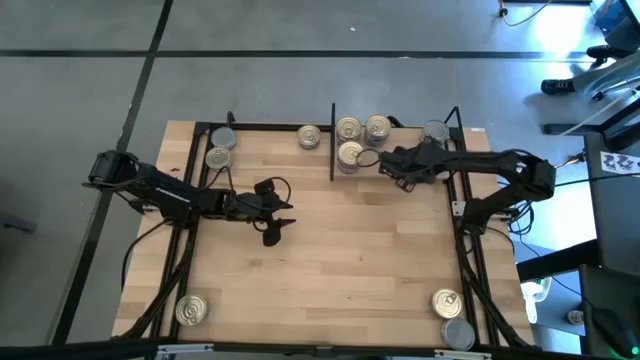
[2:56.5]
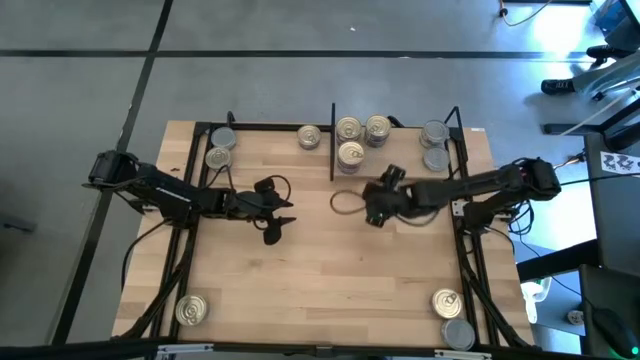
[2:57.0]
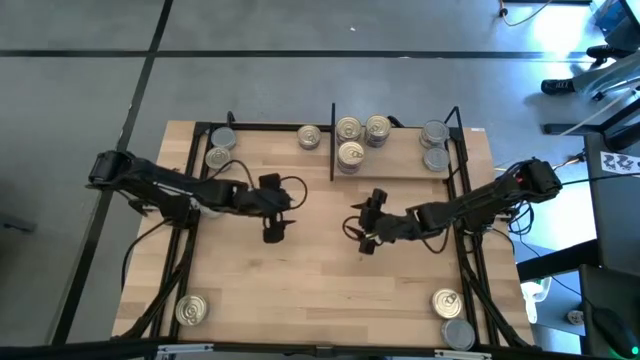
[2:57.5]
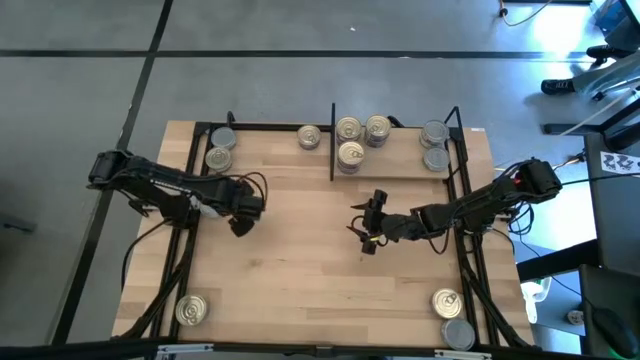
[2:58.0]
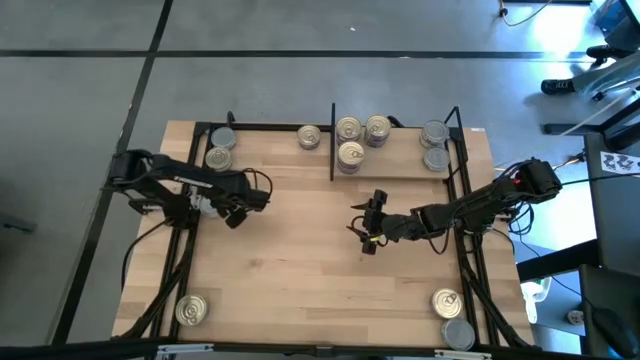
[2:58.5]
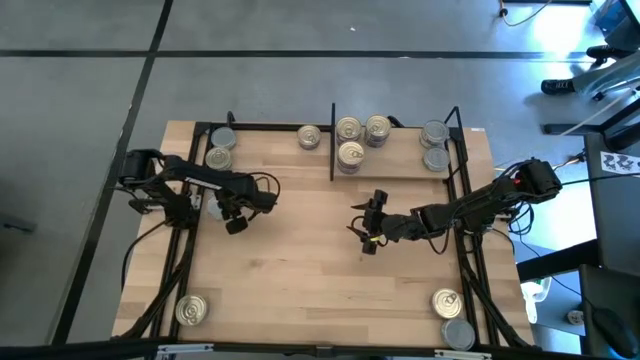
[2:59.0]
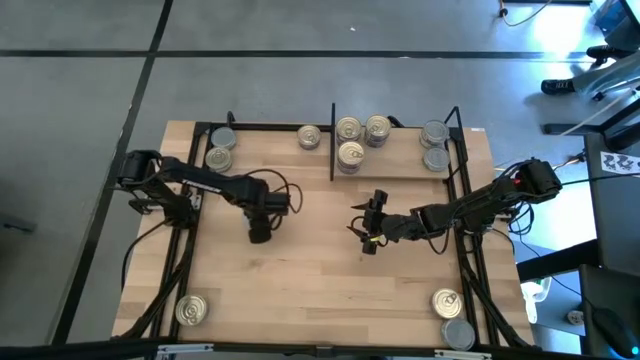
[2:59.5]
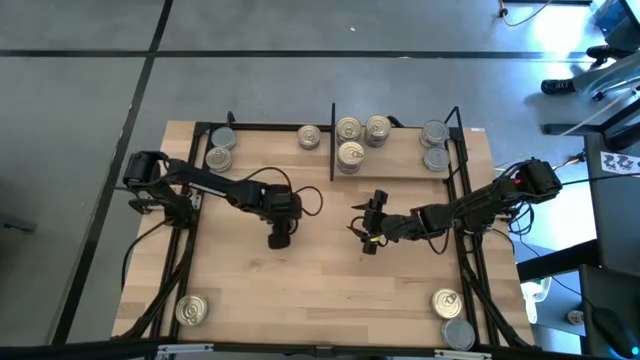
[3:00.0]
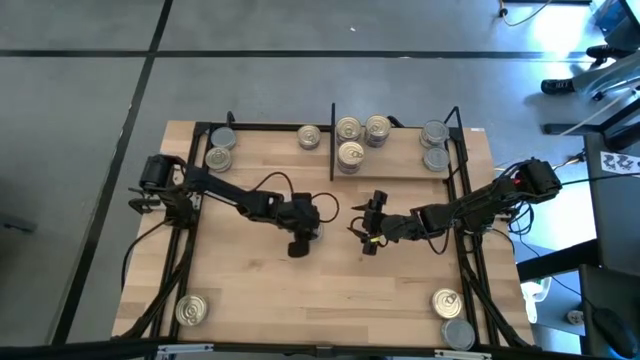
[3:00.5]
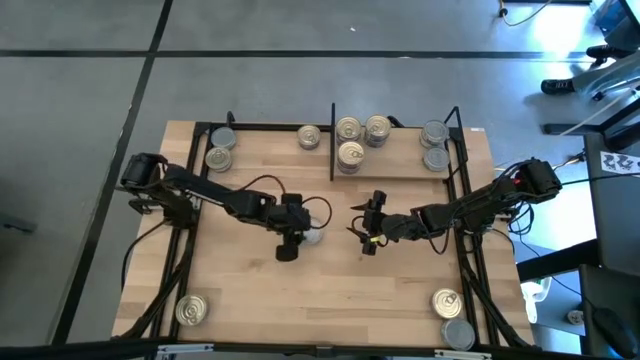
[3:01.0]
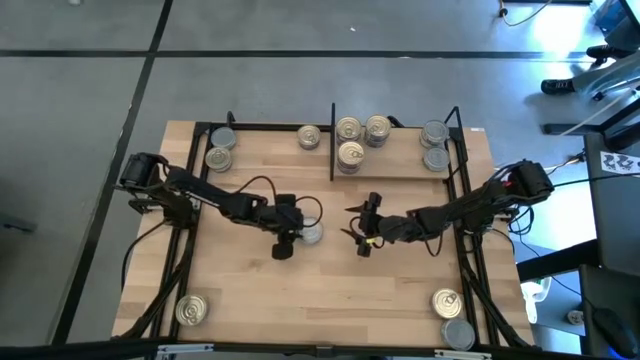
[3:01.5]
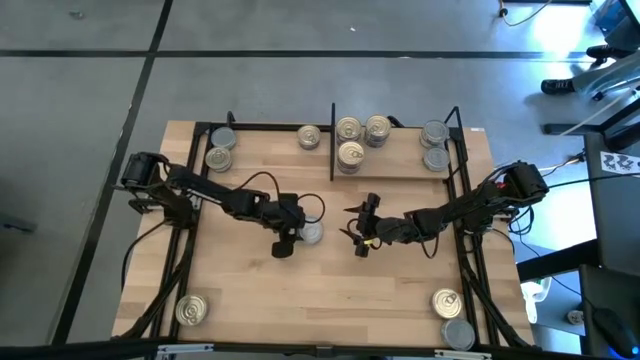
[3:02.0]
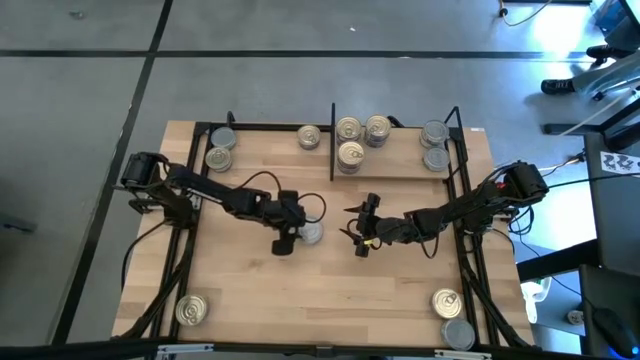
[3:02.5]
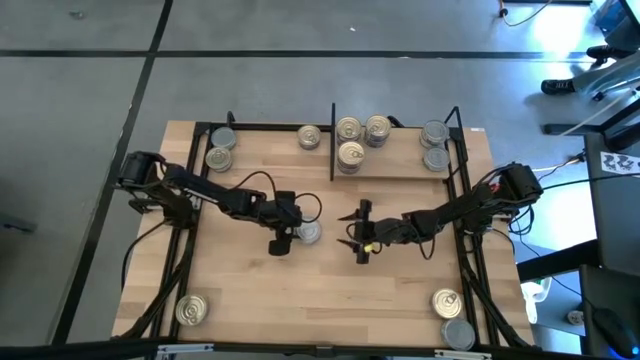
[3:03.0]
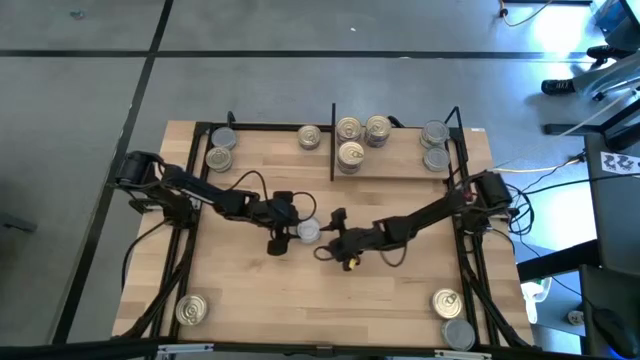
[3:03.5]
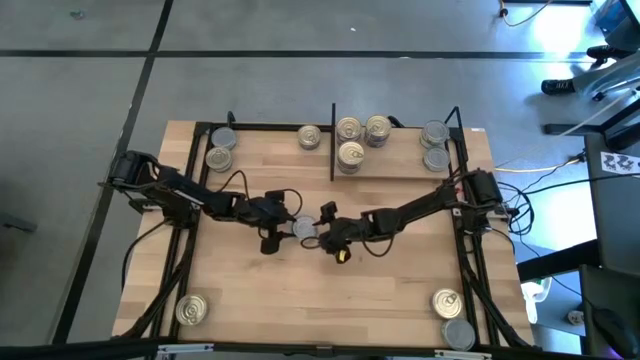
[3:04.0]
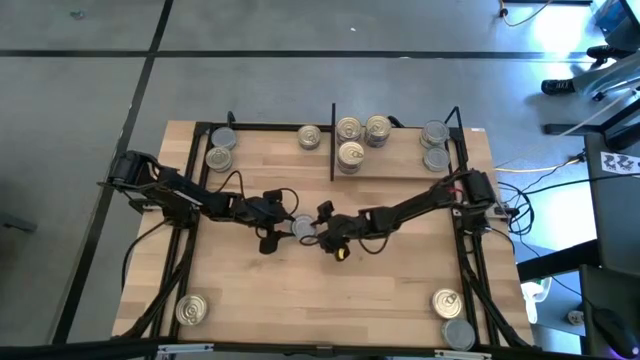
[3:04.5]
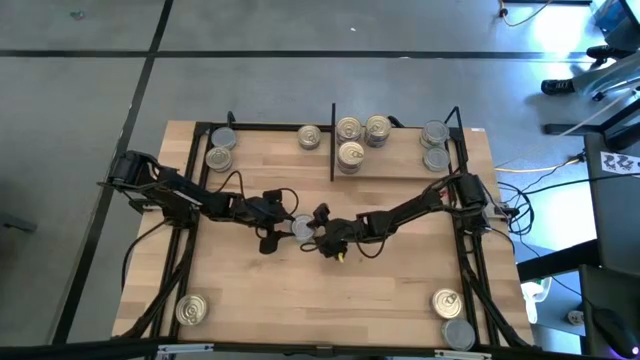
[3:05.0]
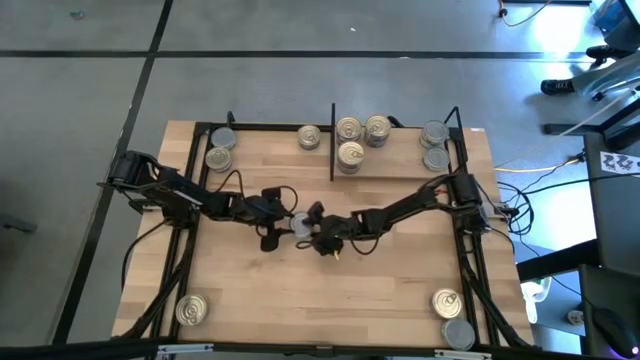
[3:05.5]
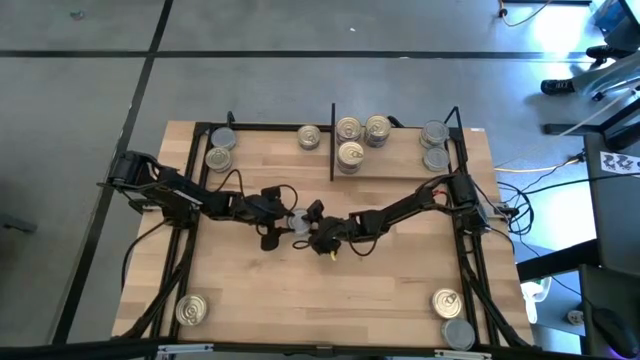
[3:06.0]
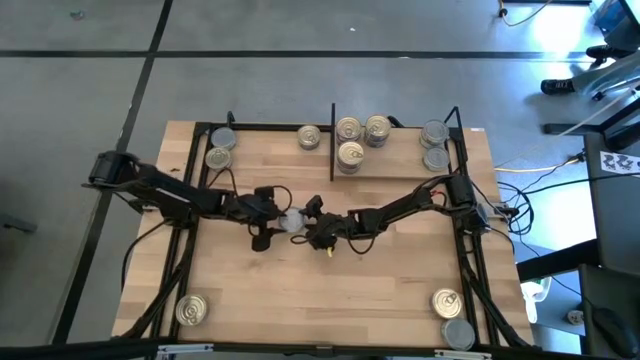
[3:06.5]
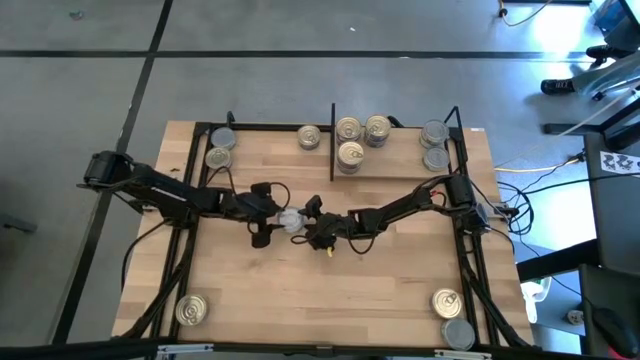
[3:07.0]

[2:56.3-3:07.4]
Task: Stack canned seafood by type on shelf
Stack the green tuna can on top of the green tuna can

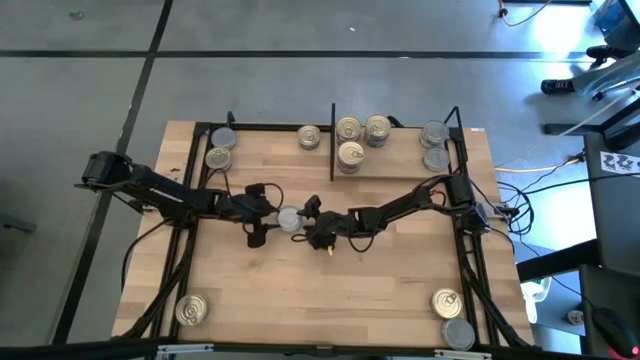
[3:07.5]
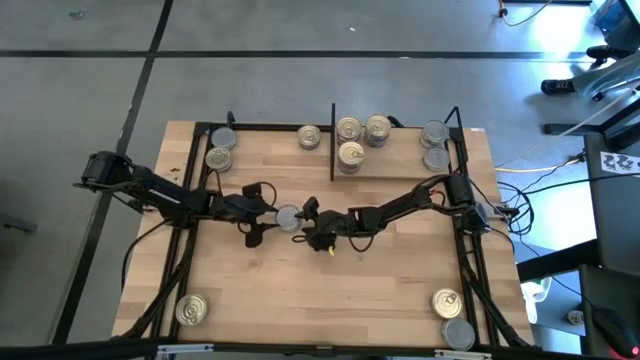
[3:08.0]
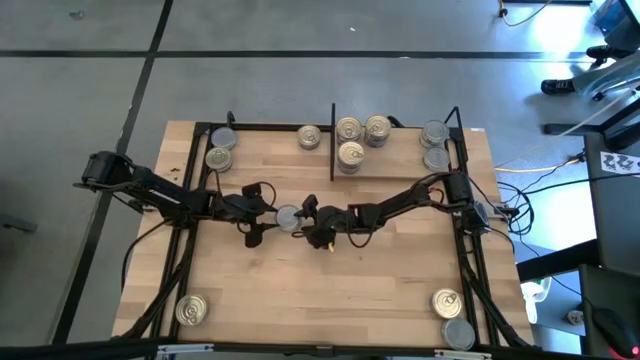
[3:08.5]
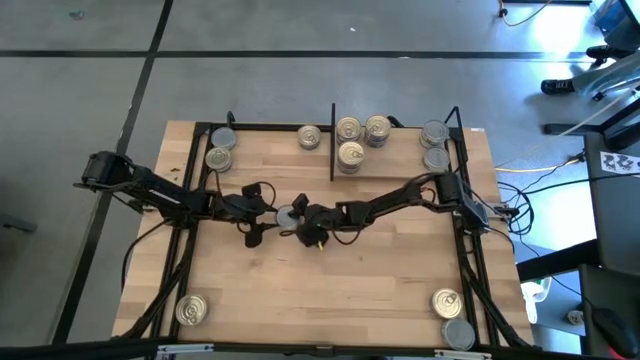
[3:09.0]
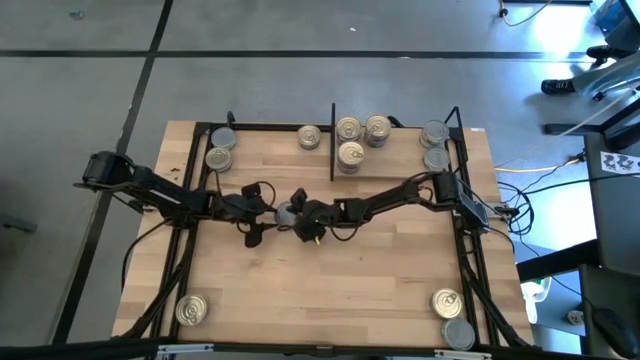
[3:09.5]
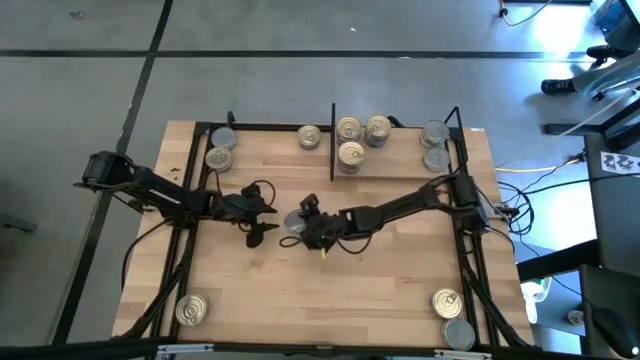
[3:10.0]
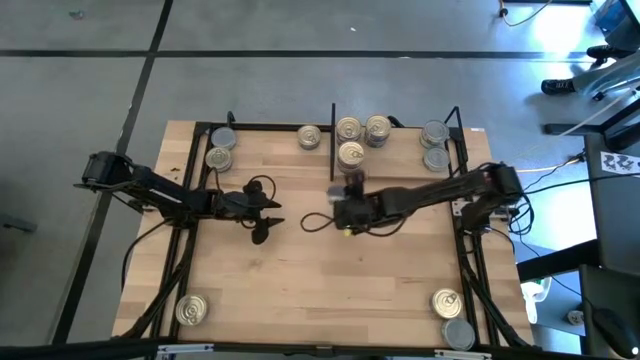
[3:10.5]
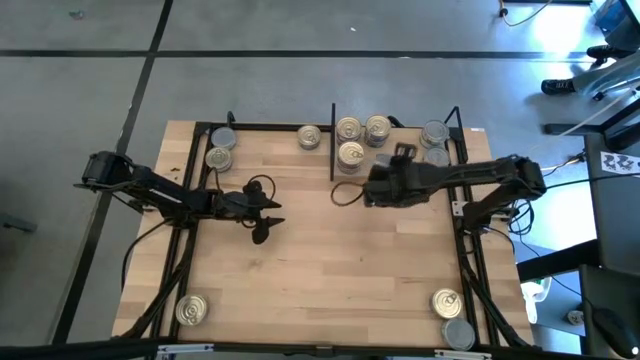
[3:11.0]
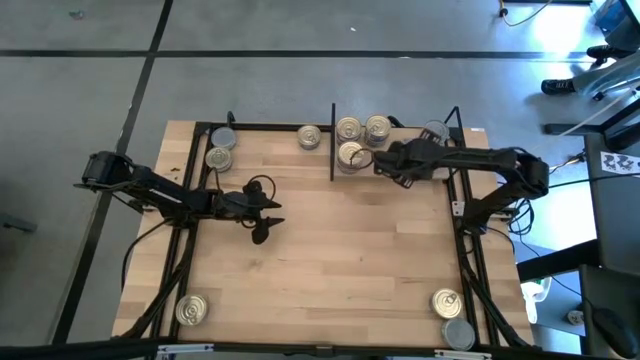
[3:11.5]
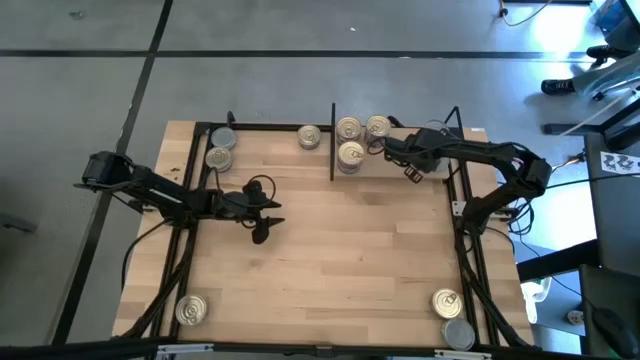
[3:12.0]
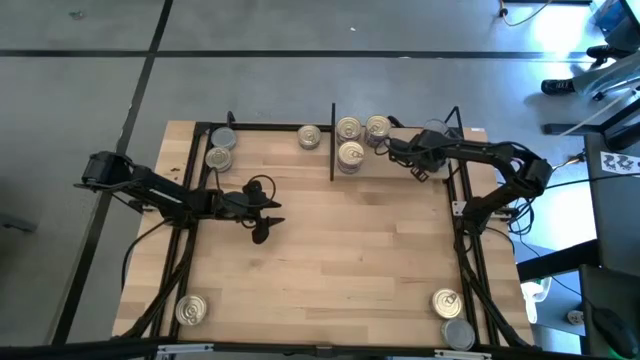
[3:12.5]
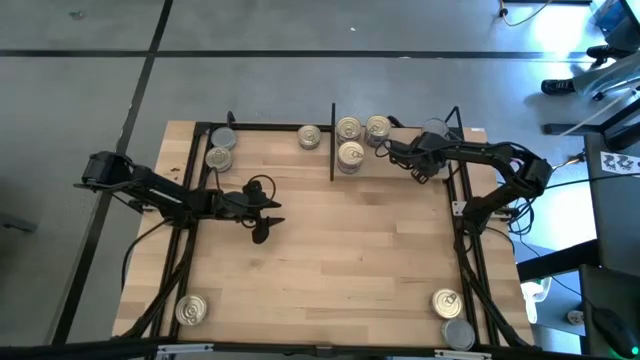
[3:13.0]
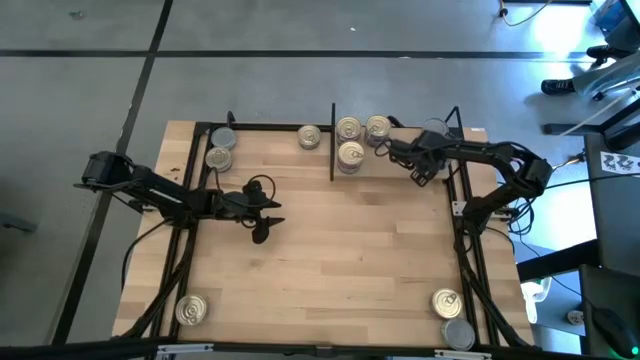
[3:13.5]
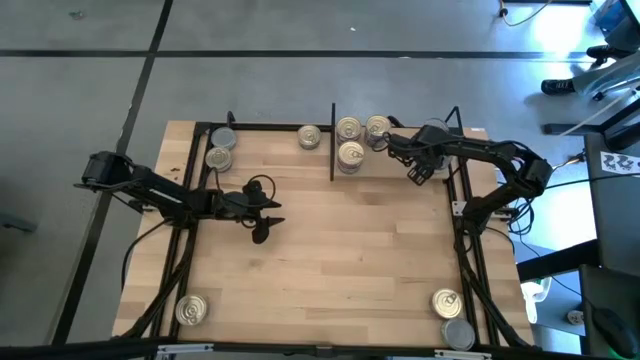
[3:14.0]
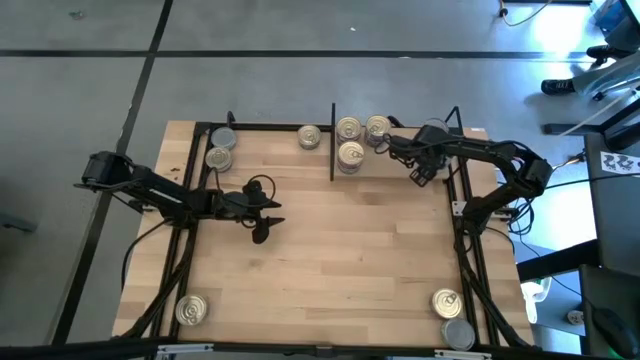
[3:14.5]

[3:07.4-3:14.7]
Stack the green tuna can on top of the green tuna can

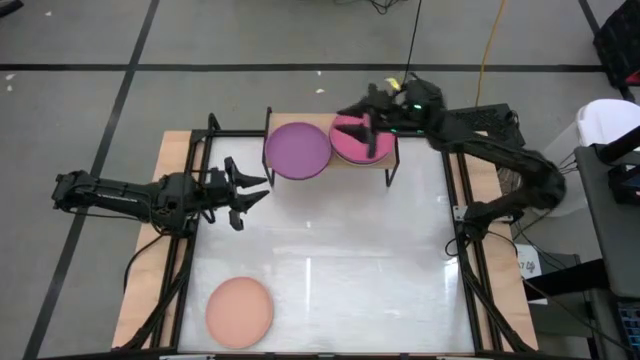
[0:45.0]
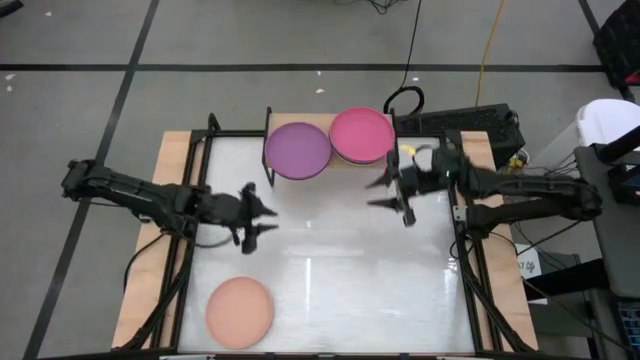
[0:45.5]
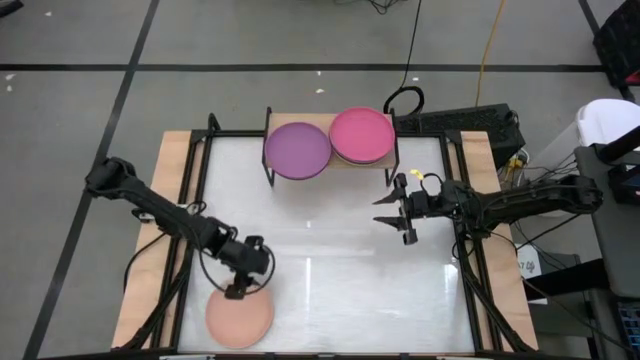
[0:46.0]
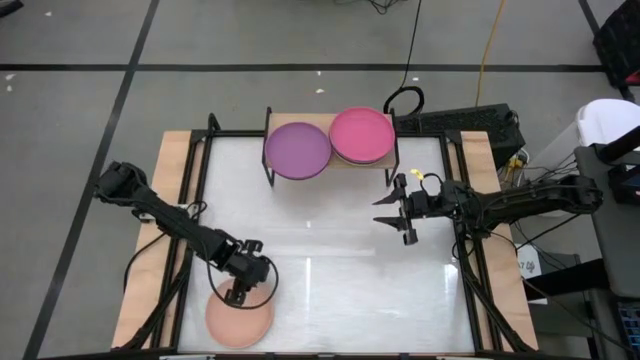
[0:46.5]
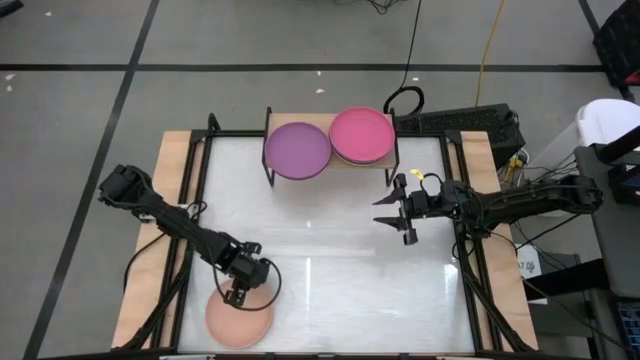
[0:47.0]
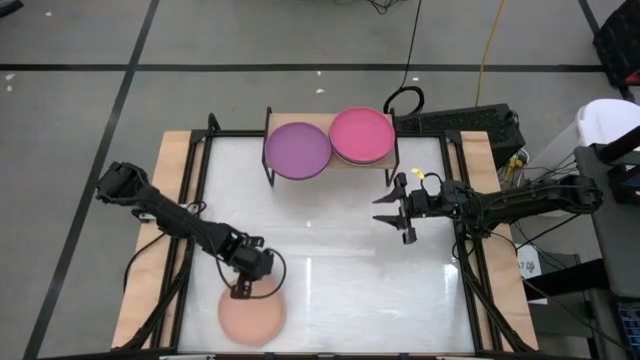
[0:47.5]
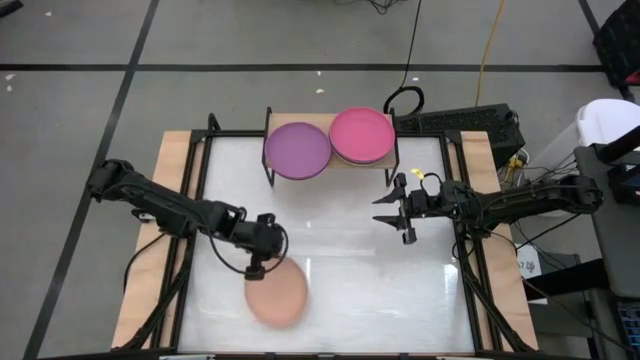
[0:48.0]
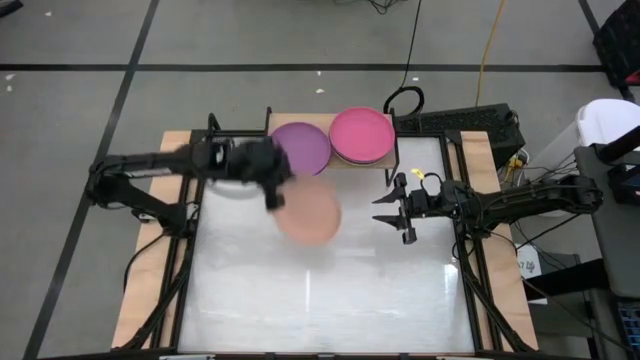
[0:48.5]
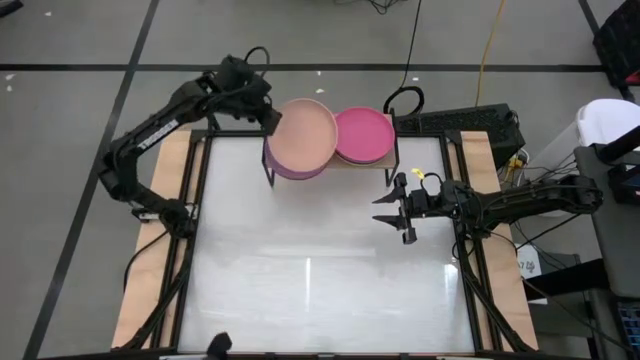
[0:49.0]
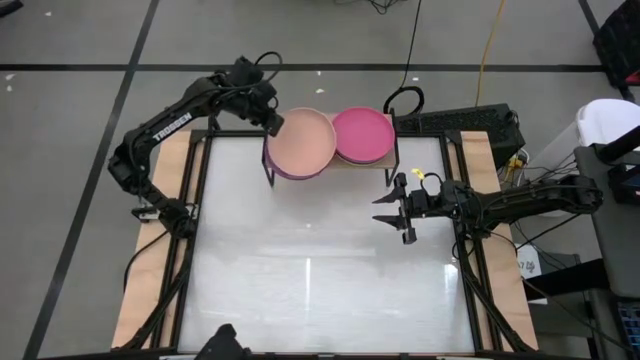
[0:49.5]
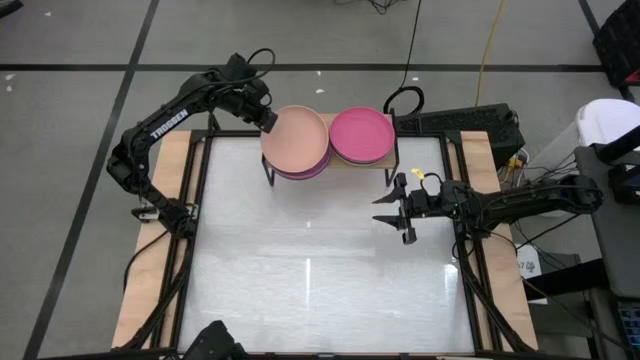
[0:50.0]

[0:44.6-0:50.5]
Task: Place and stack plates onto a shelf
Stack the light orange plate on the purple plate on the shelf
